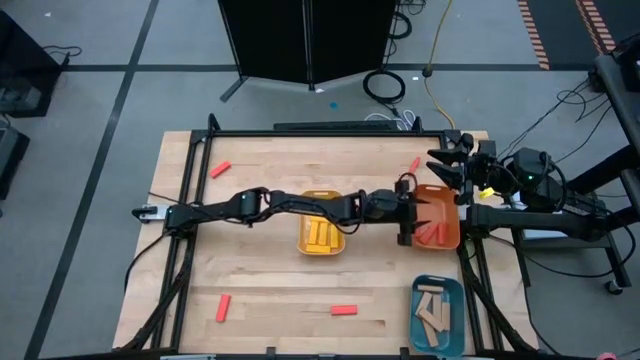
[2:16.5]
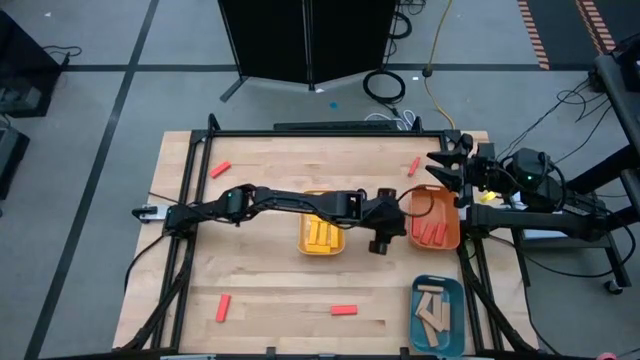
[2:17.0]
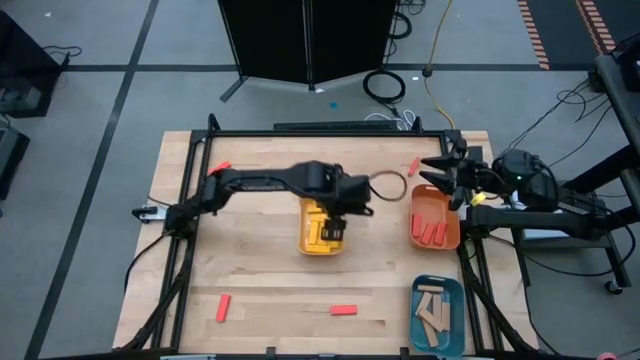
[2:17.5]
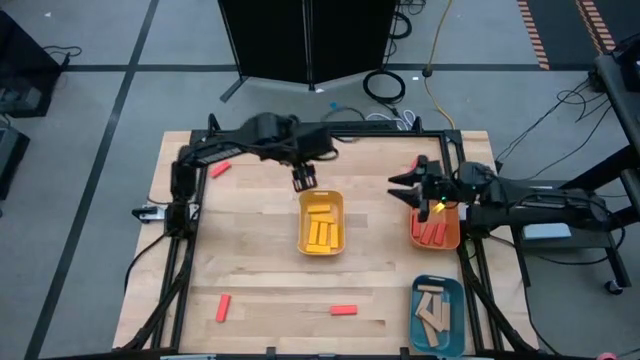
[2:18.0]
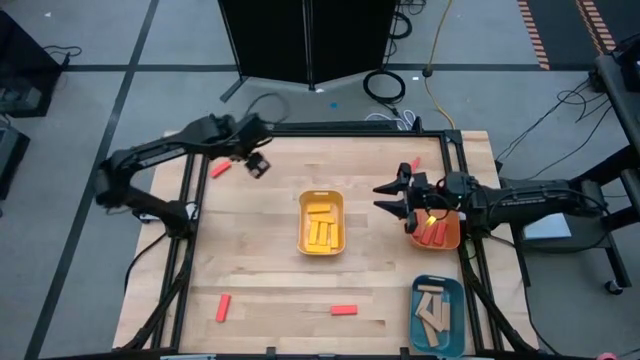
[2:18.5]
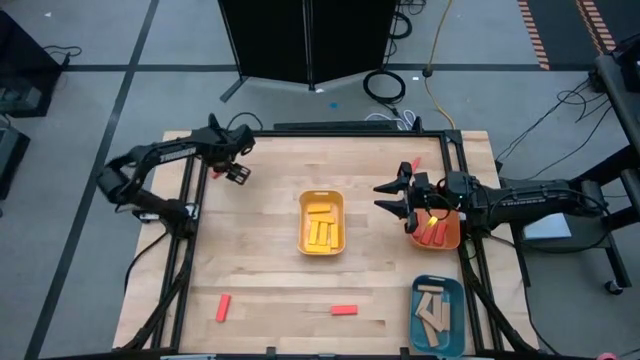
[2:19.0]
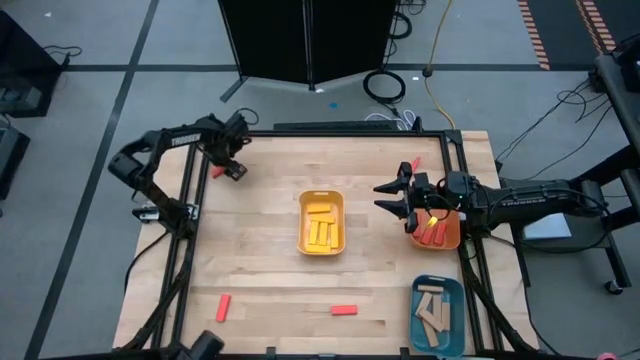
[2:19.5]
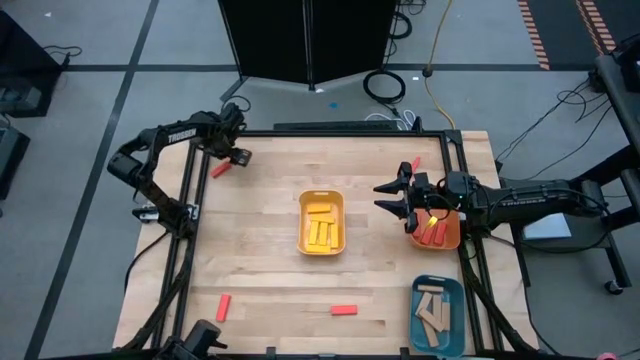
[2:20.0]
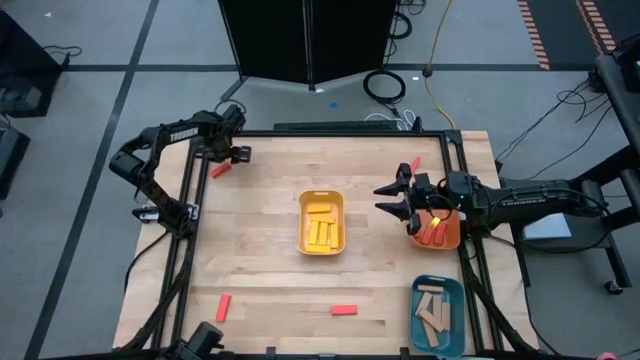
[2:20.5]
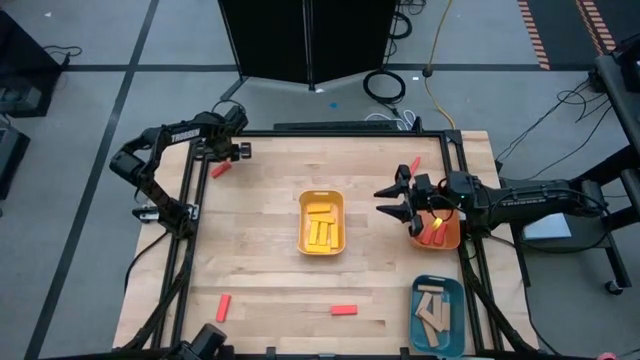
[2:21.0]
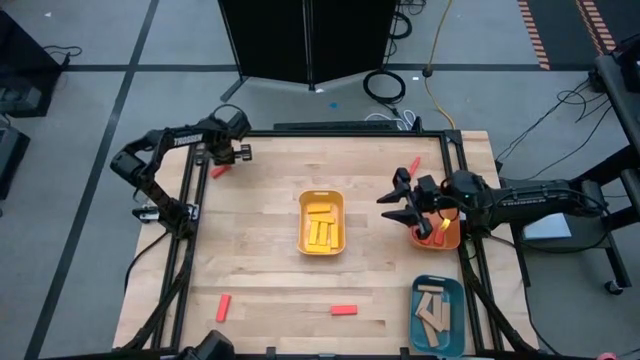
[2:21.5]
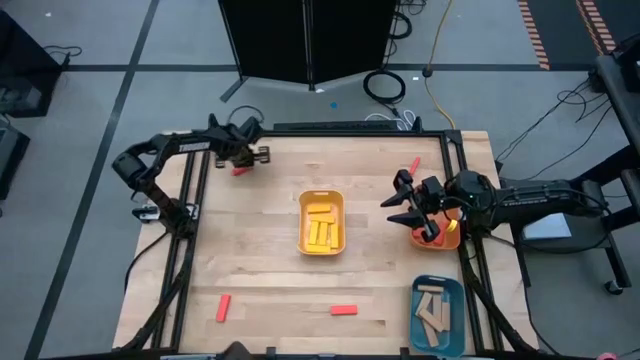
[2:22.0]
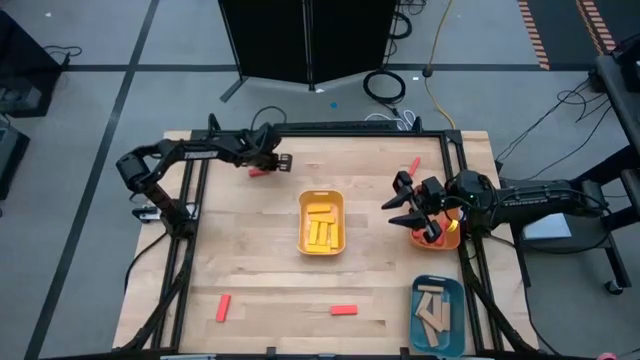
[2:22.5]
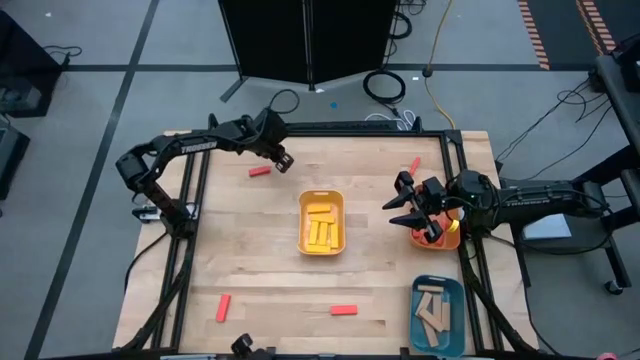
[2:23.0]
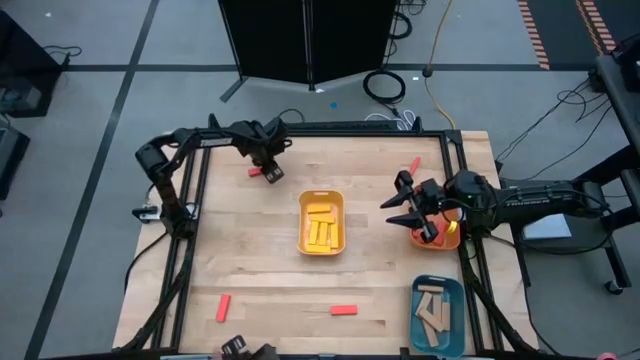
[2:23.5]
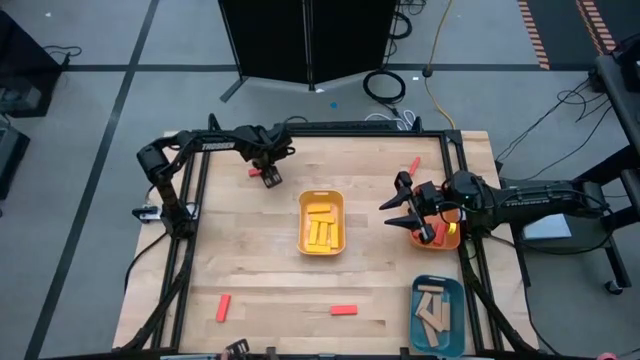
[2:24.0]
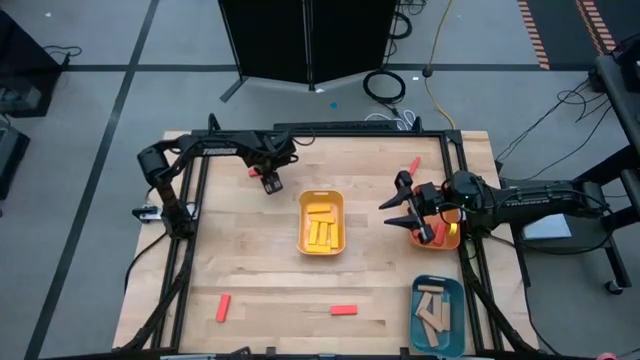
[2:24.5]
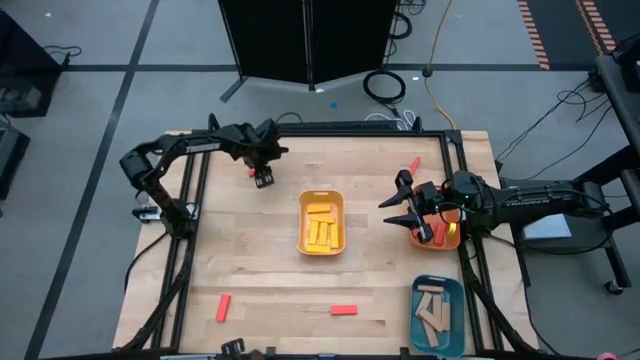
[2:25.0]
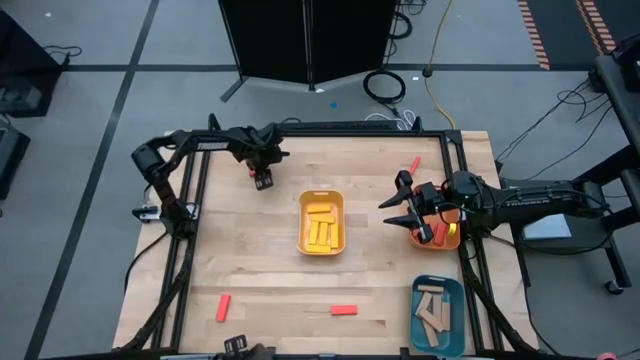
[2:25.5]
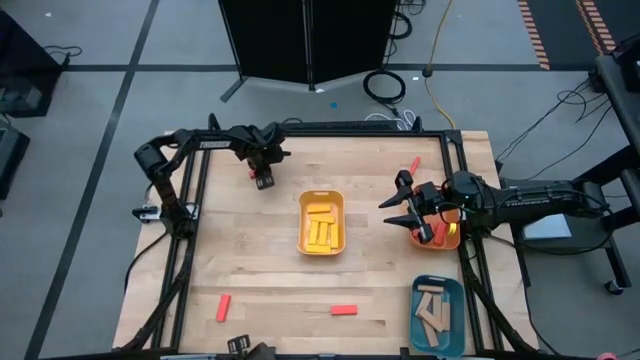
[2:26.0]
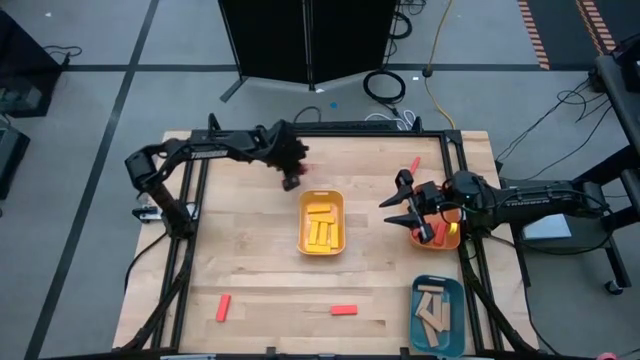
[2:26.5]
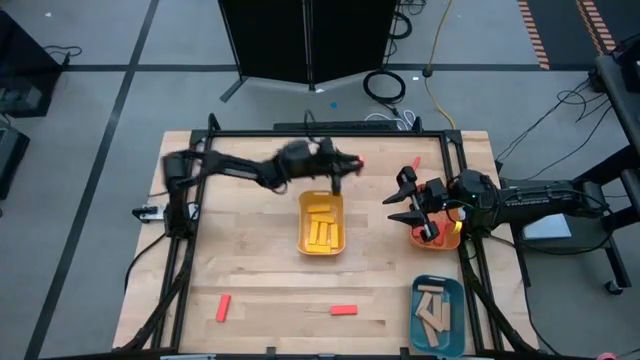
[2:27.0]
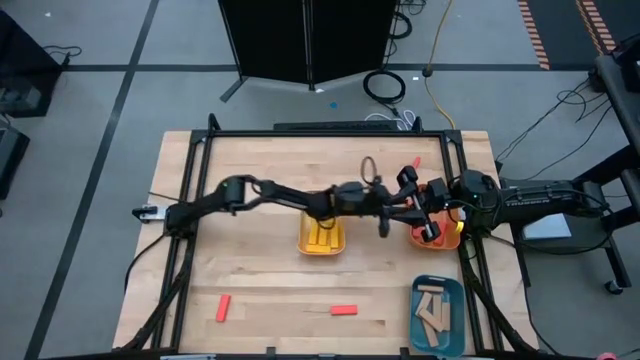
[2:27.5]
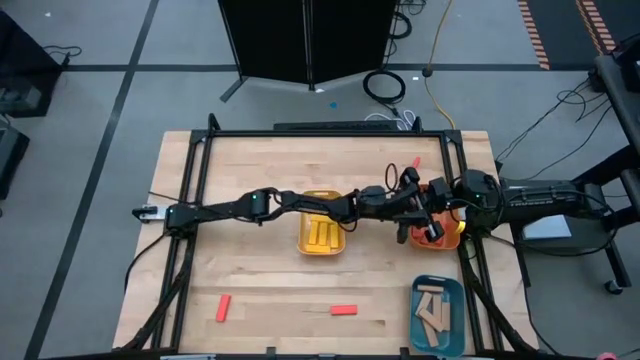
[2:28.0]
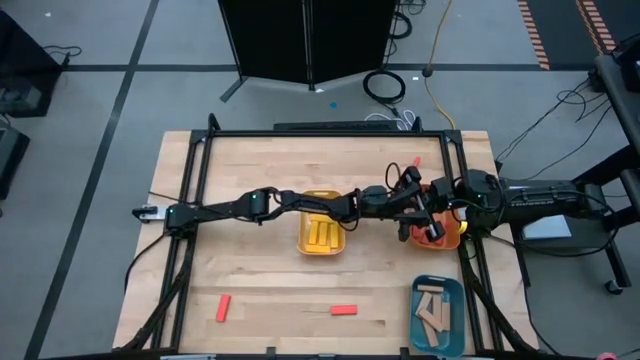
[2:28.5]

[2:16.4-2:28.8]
Task: Sort blocks
Put the orange wooden block into the orange bin

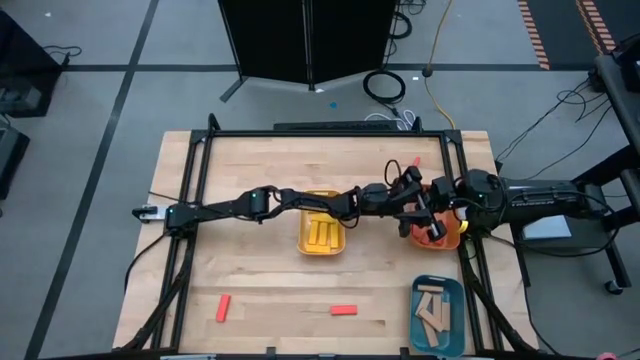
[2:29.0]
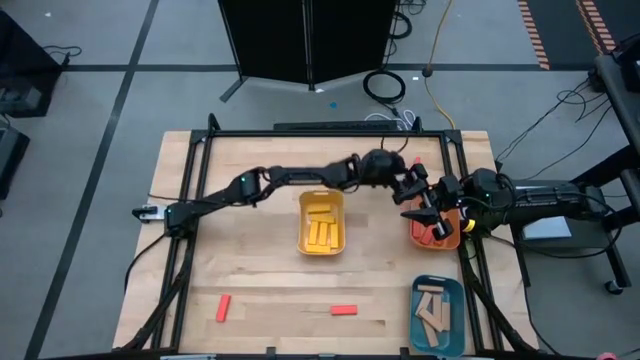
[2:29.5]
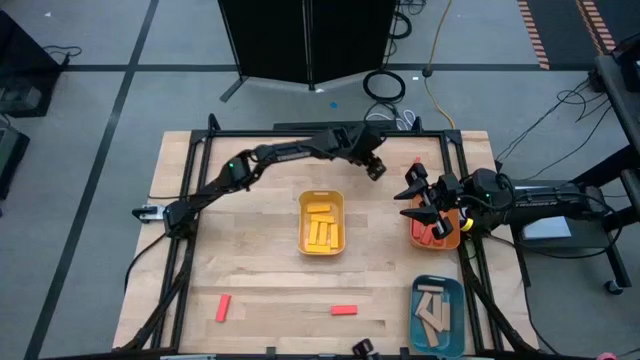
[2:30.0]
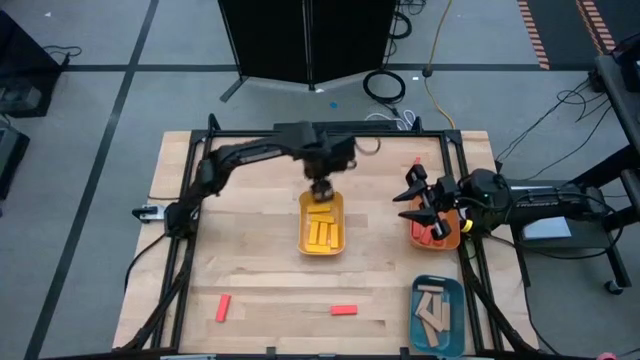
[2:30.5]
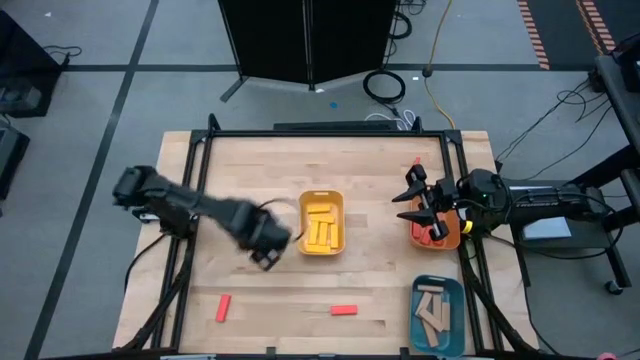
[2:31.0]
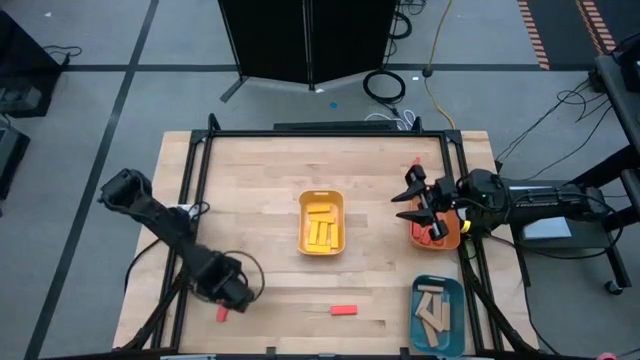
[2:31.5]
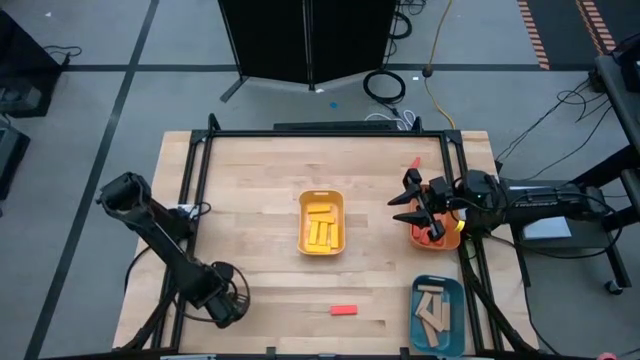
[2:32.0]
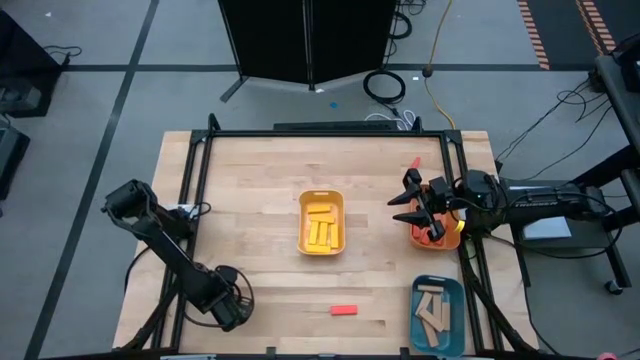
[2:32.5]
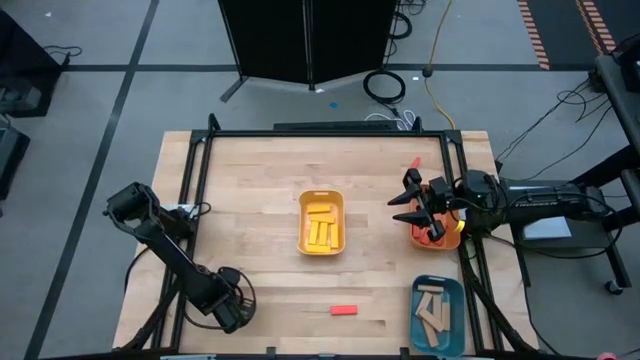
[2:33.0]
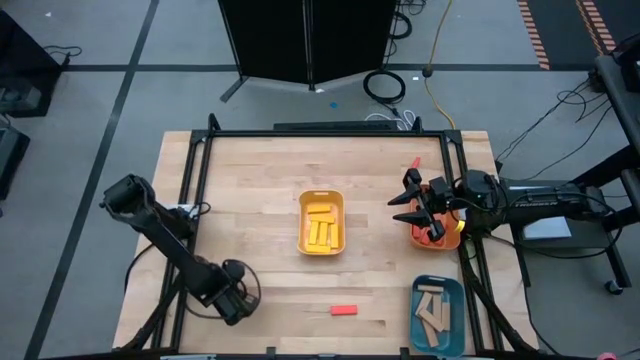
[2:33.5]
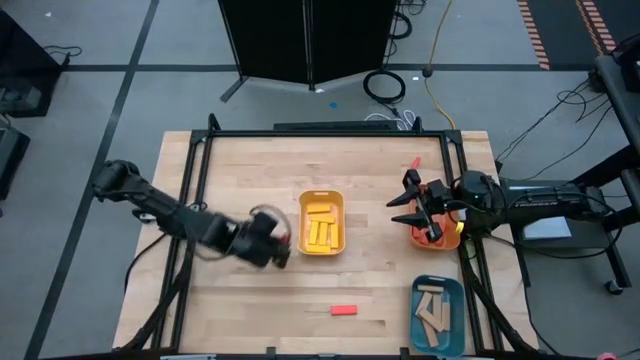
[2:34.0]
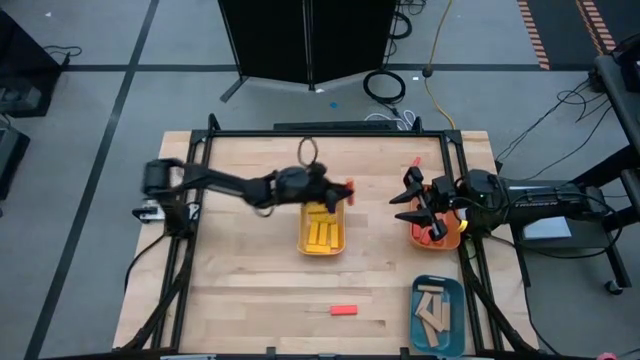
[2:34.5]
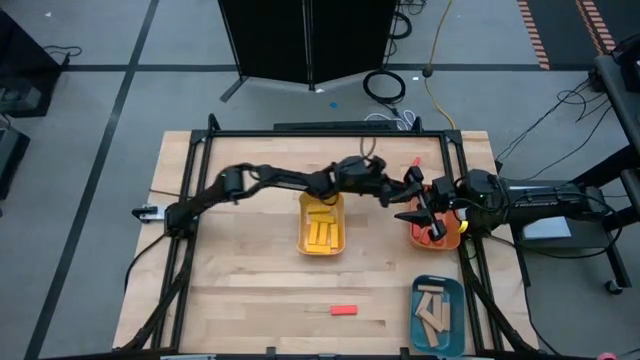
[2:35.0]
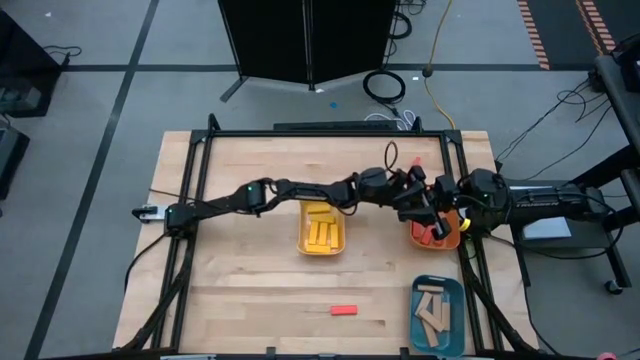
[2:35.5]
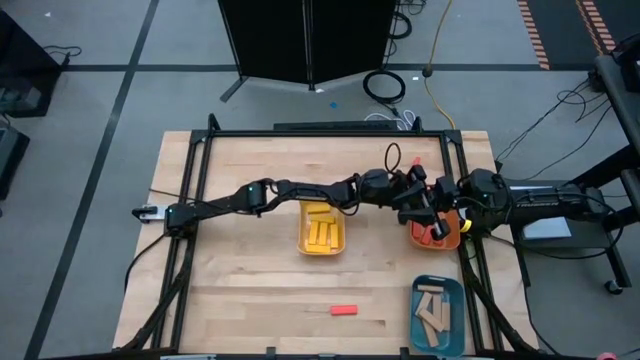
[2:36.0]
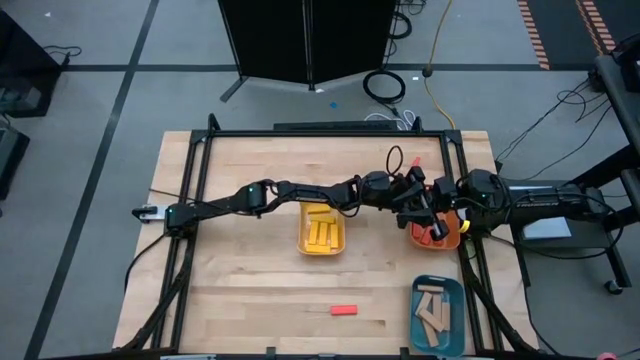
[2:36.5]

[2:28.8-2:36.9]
Put the orange wooden block into the orange bin

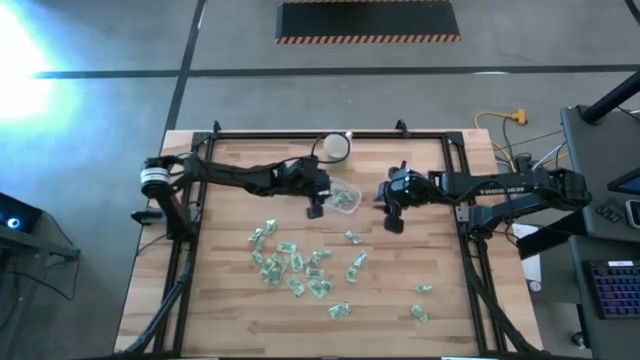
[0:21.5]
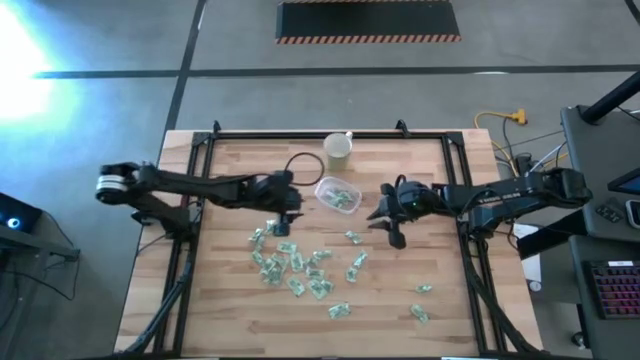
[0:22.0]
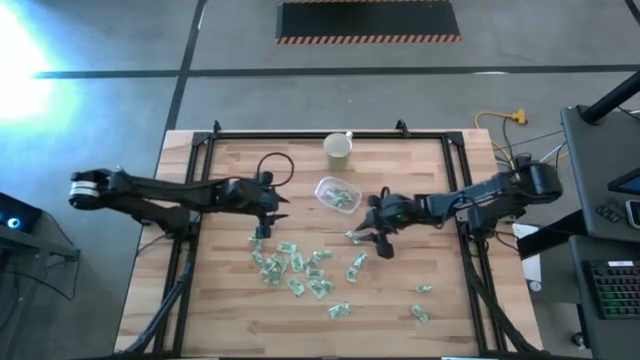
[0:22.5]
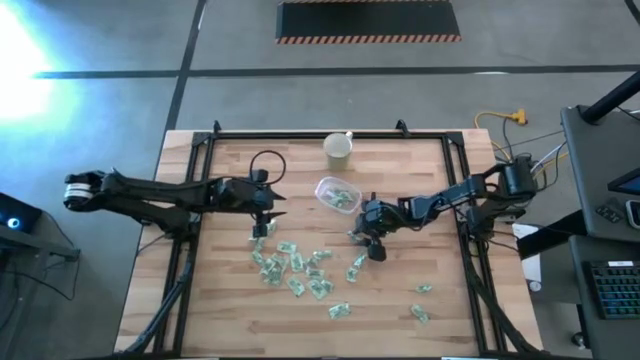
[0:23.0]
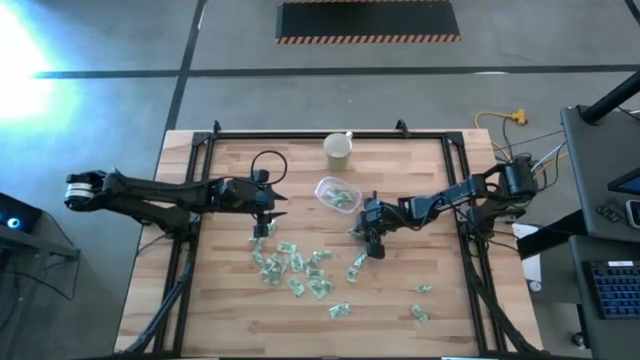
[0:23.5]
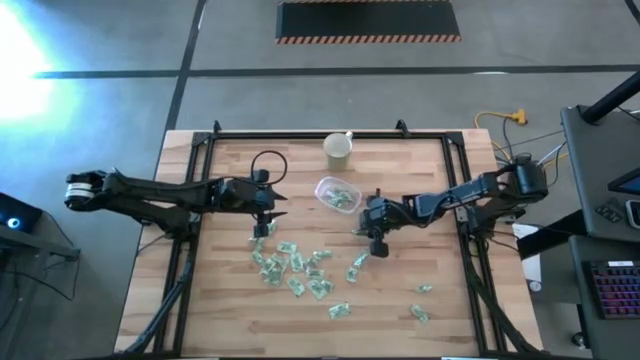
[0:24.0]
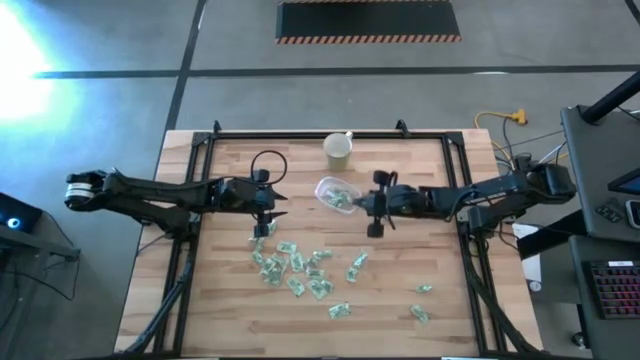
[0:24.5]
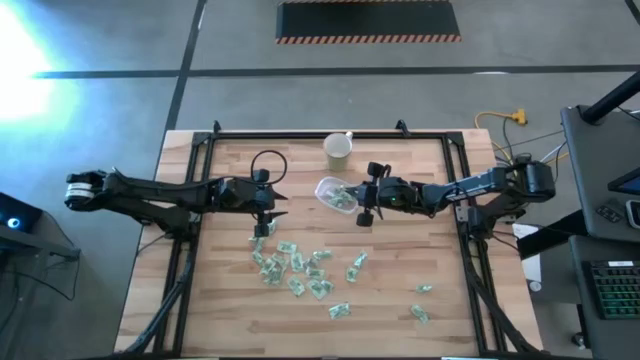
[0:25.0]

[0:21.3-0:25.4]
Task: Pick and place items into bin
Put the green stevia packet into the transparent bin
